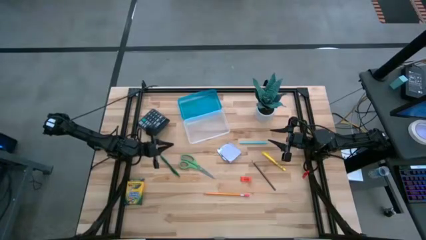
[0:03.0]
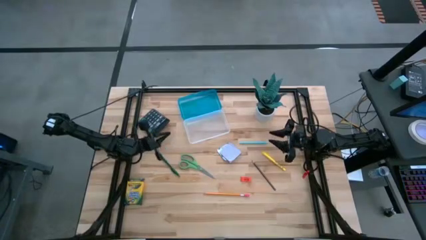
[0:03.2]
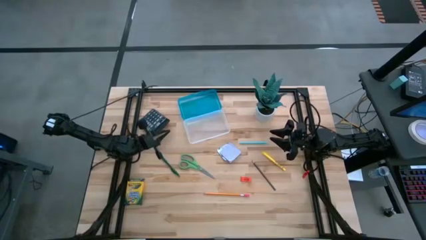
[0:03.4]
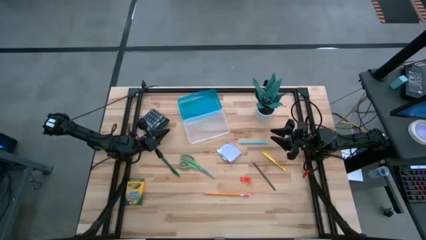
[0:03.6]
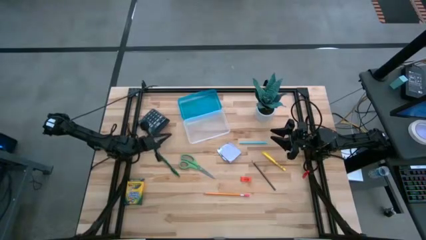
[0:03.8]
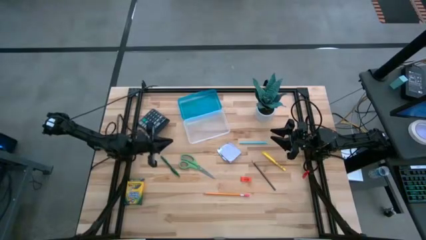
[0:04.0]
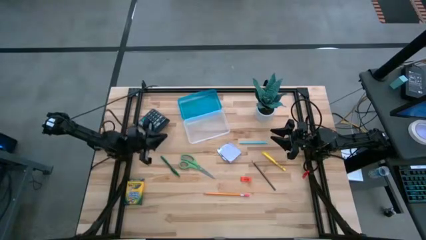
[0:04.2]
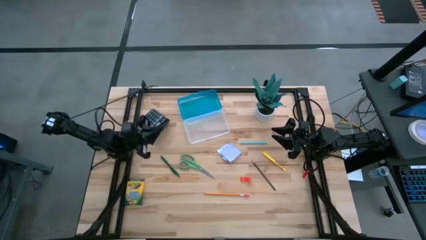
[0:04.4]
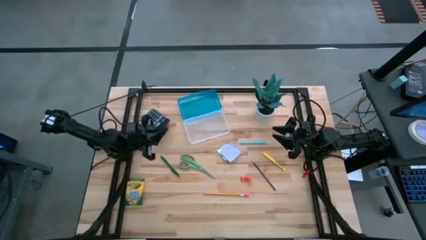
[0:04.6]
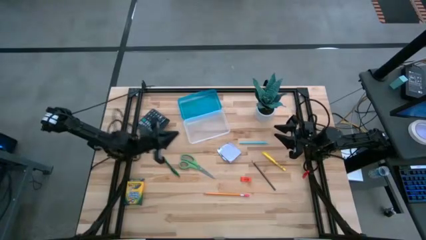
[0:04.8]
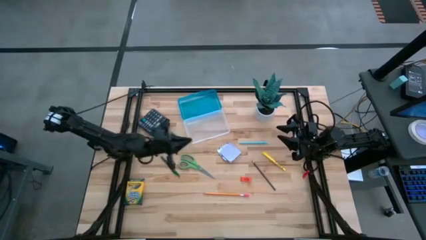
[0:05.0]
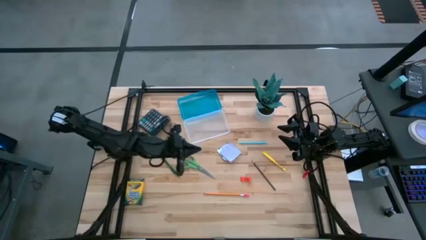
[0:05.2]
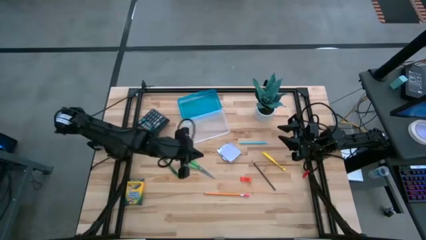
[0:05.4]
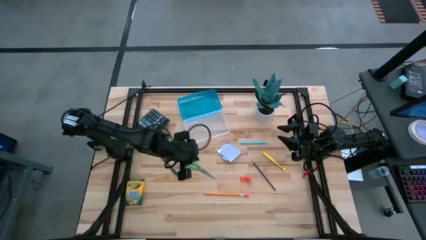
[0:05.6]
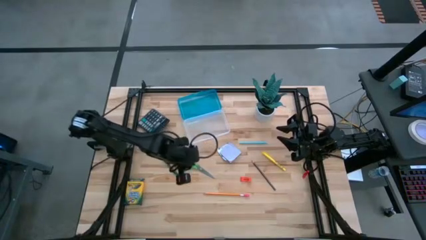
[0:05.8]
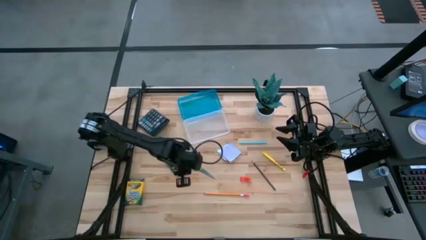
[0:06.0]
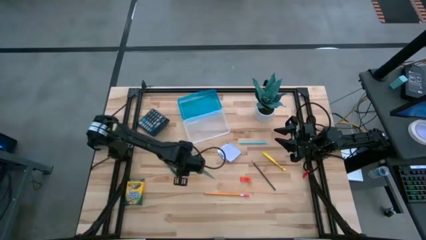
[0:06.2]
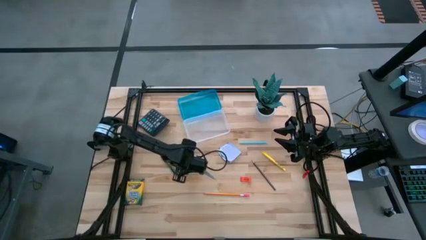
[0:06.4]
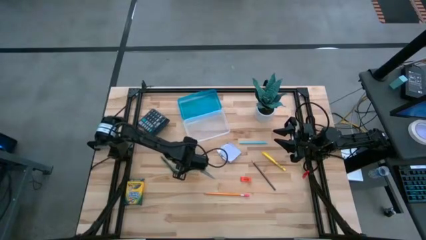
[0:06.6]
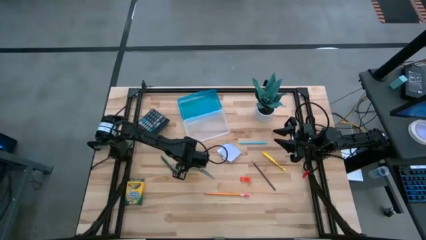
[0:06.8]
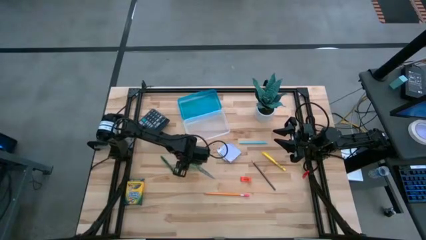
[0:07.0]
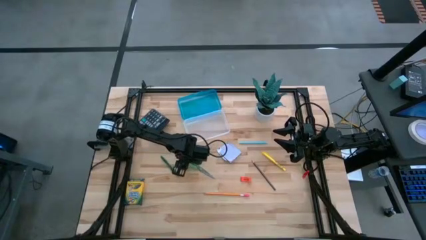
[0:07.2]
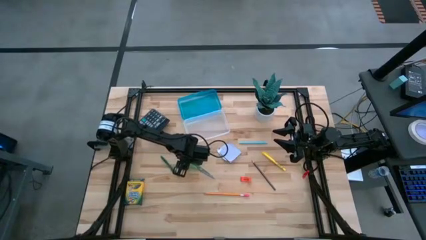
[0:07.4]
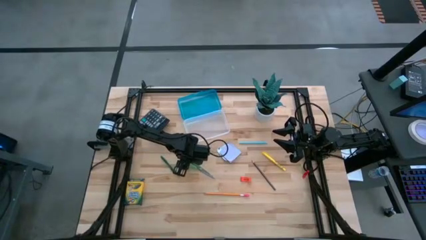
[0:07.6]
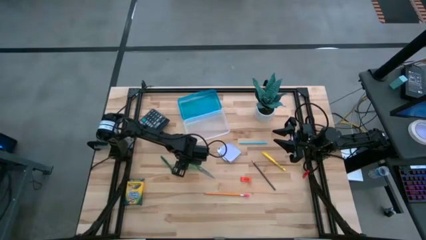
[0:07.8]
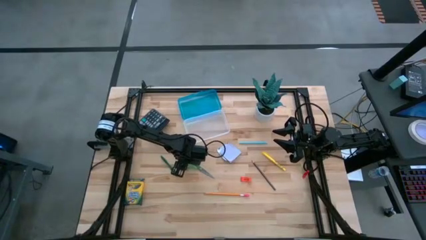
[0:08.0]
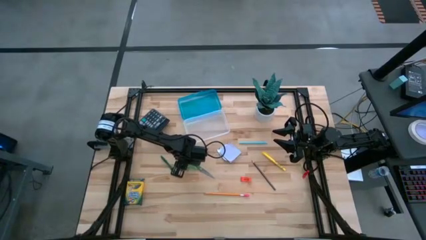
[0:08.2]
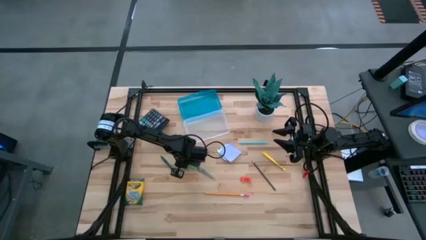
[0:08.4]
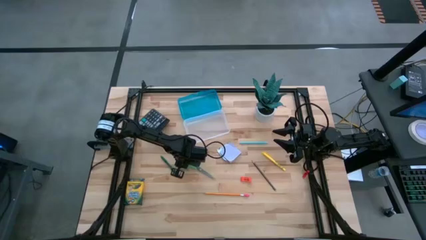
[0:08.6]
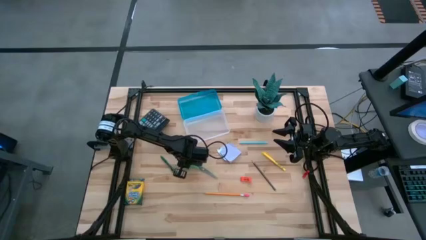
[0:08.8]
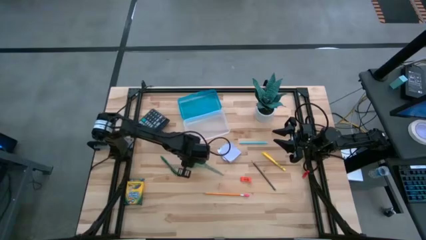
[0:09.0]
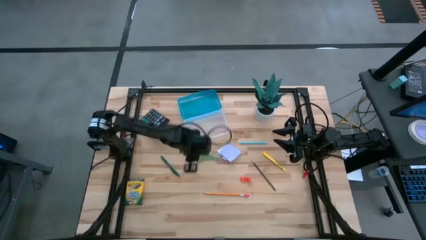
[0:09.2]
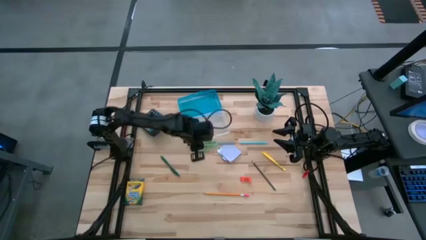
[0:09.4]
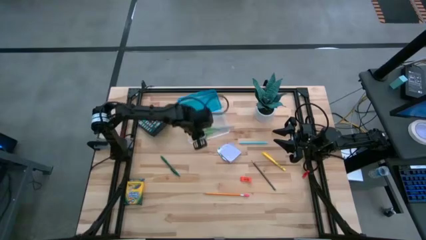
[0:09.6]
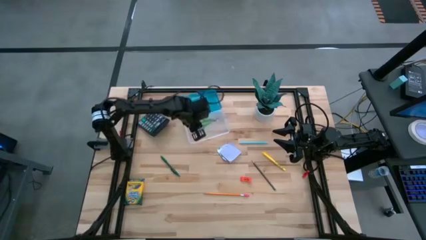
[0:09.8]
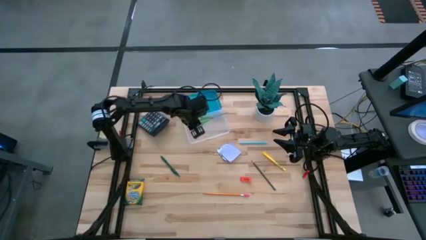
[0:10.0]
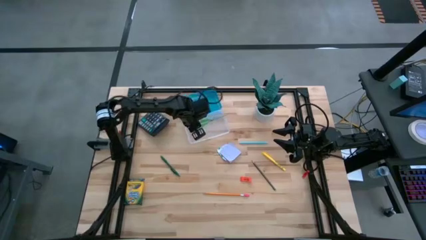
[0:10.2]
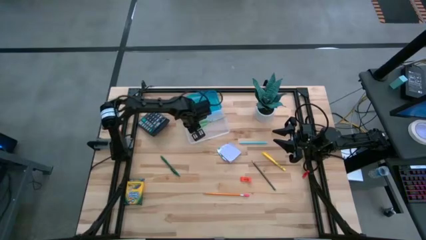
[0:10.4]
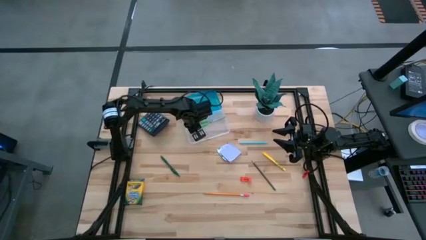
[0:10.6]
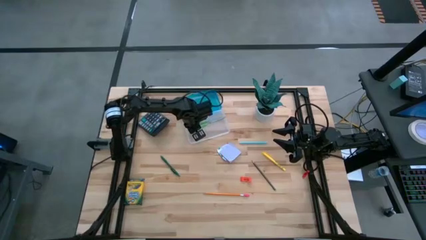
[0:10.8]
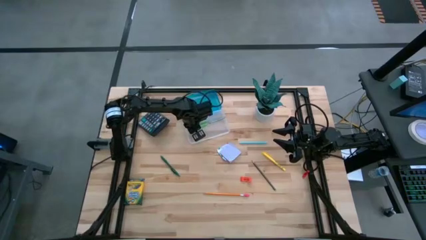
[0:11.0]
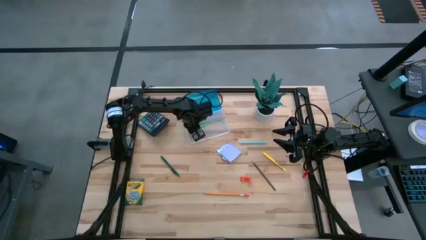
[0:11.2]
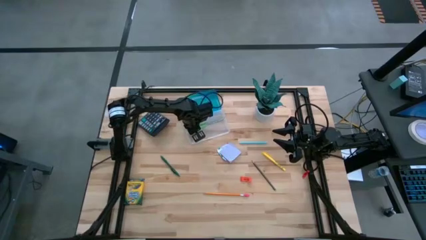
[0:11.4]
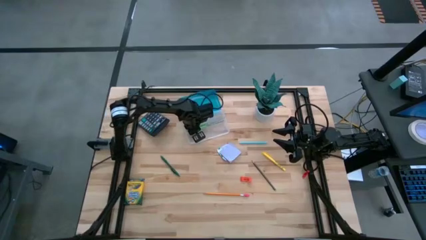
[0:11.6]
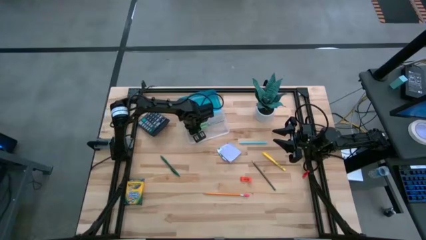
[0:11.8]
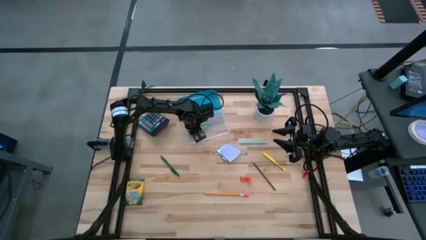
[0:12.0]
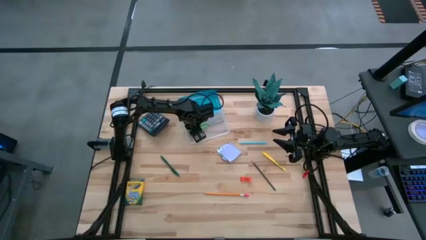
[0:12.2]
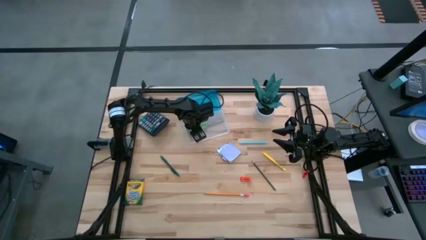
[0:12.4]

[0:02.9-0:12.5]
Task: Pack school essentials
Put the green scissors into the blue supply box

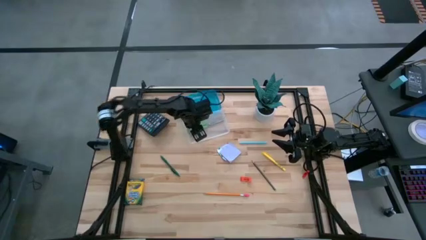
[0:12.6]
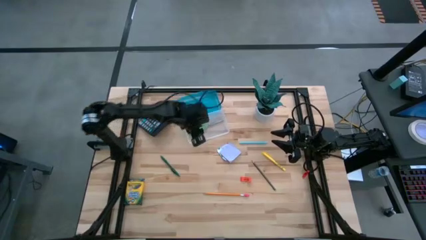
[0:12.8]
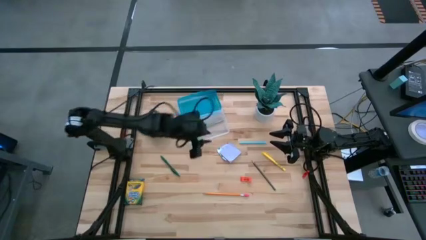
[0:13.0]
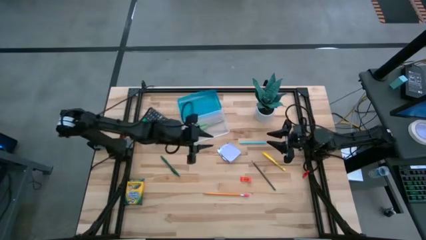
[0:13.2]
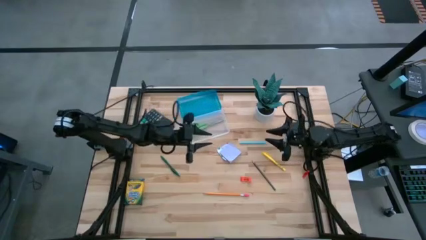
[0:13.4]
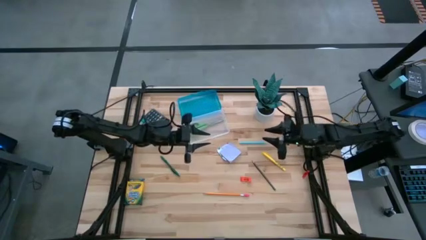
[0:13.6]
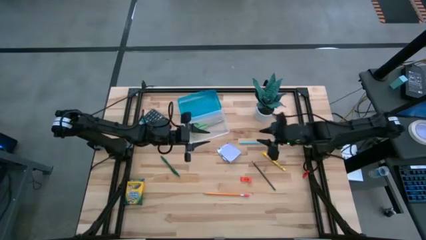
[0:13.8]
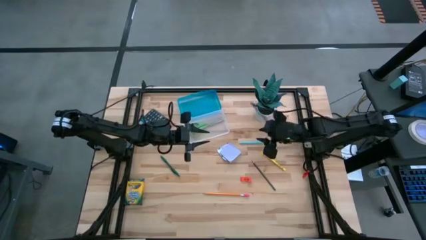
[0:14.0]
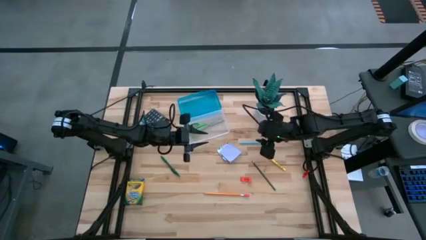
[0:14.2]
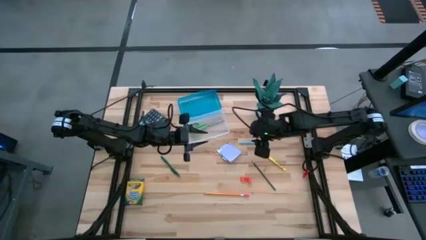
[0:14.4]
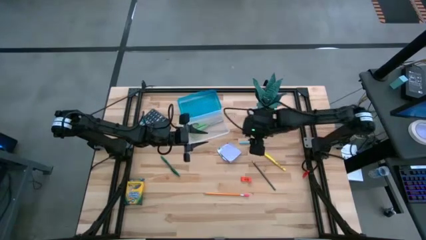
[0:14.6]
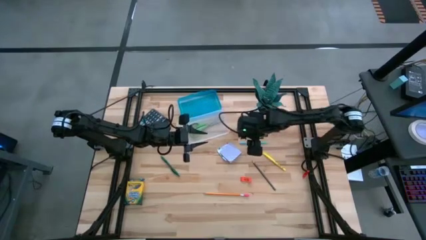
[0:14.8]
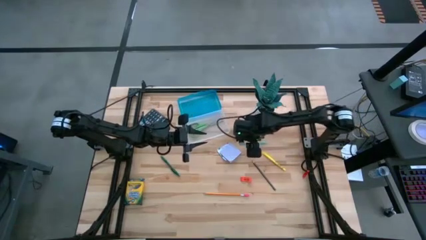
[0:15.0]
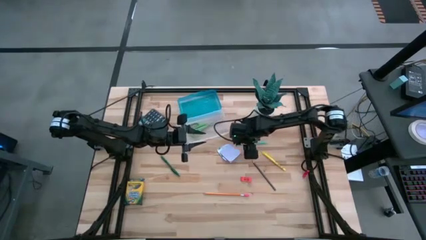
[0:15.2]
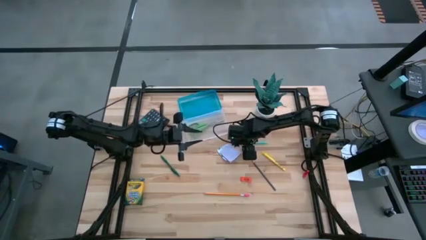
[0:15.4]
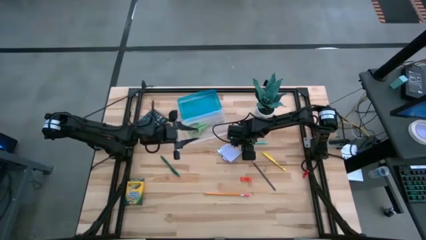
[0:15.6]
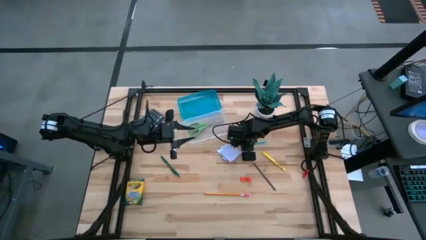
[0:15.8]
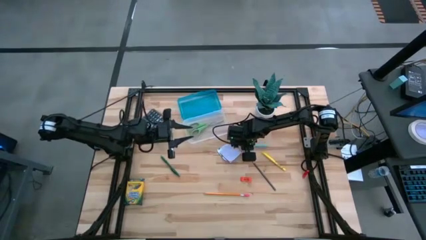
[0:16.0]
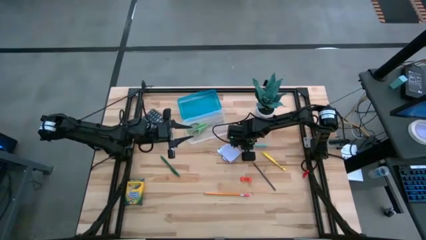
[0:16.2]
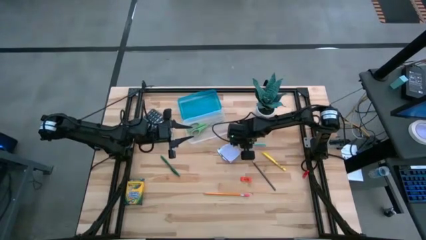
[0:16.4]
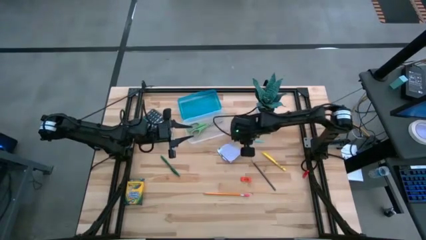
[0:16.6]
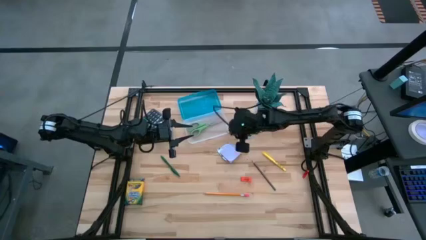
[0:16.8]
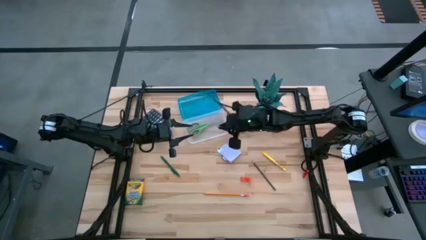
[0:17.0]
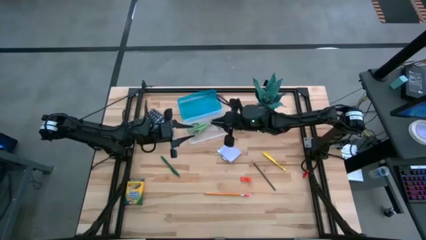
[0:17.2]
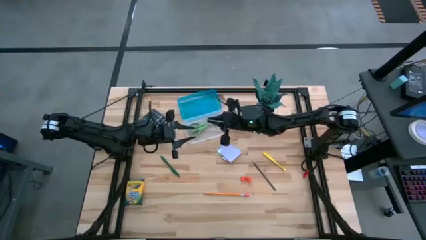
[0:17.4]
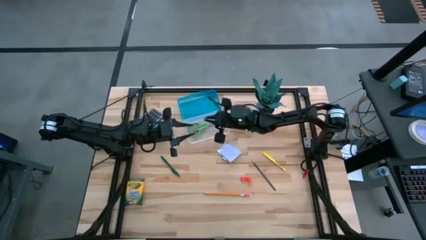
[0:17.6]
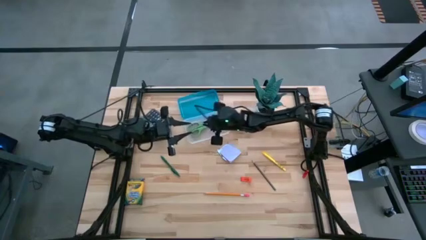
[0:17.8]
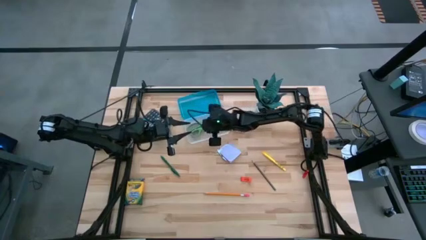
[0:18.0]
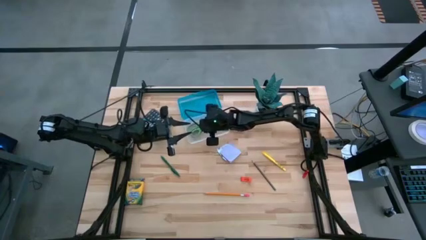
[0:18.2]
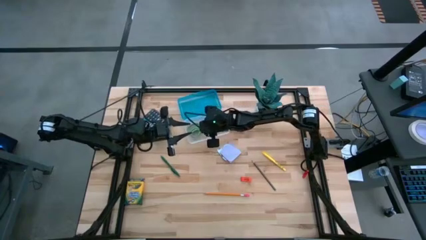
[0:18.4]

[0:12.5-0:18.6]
Put the blue pen into the blue supply box
